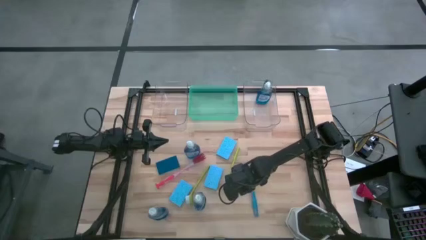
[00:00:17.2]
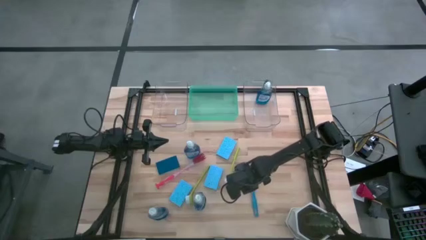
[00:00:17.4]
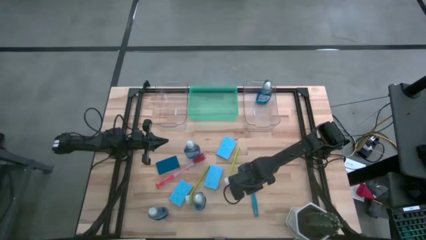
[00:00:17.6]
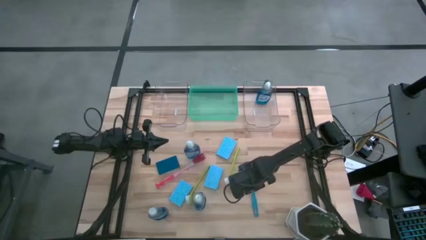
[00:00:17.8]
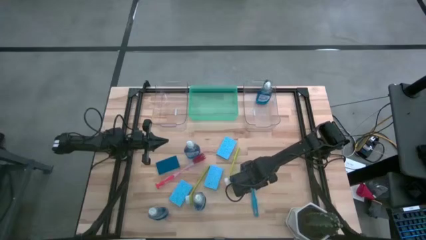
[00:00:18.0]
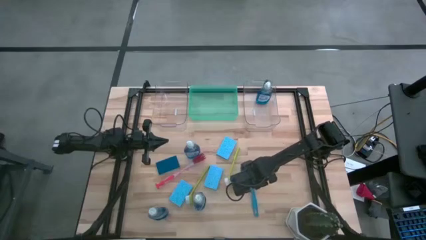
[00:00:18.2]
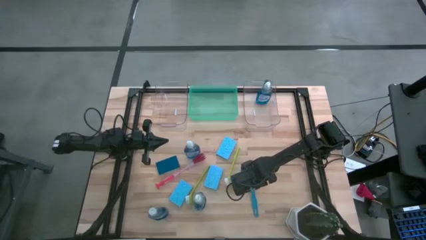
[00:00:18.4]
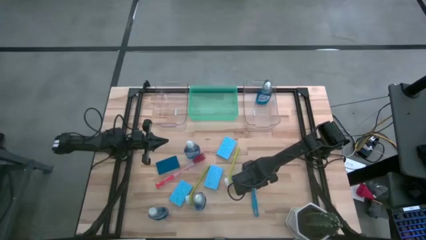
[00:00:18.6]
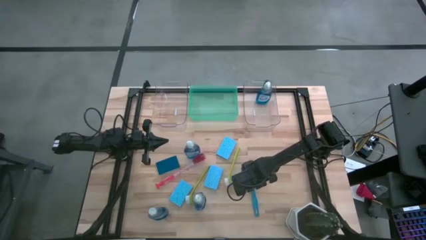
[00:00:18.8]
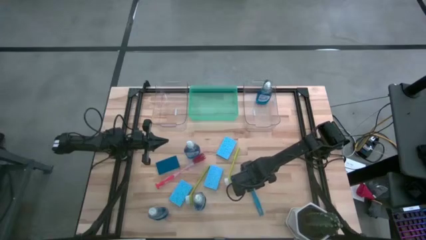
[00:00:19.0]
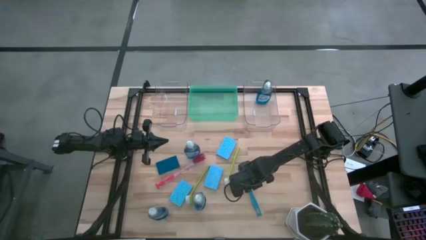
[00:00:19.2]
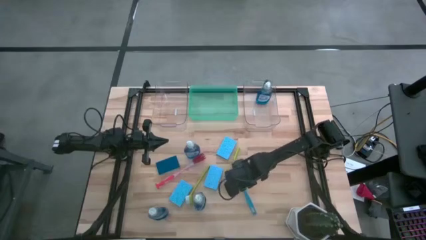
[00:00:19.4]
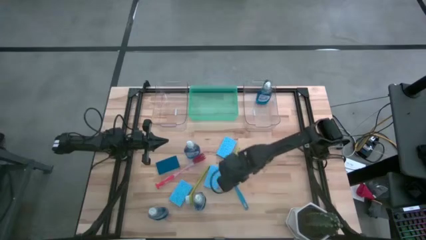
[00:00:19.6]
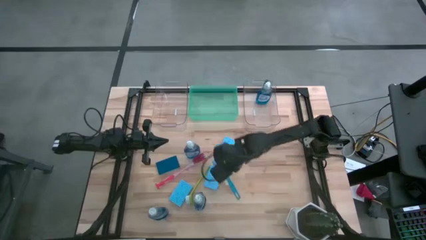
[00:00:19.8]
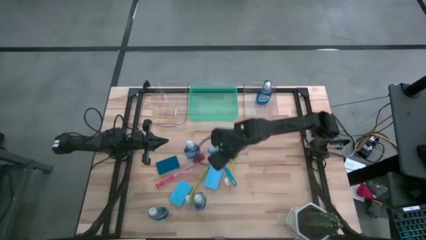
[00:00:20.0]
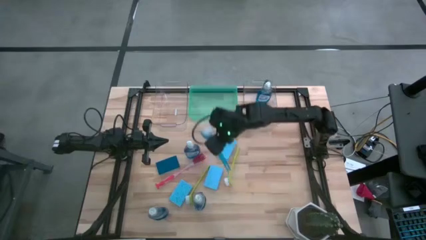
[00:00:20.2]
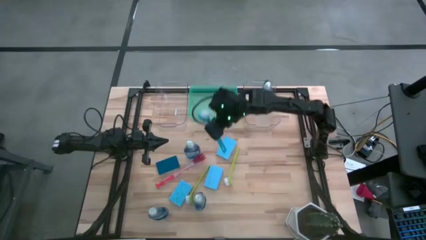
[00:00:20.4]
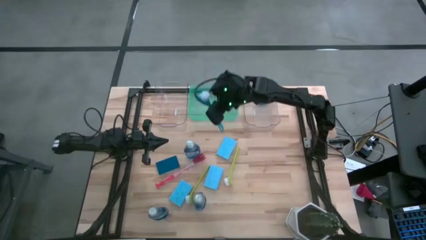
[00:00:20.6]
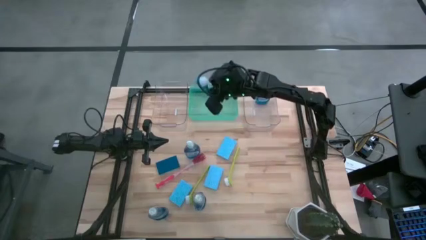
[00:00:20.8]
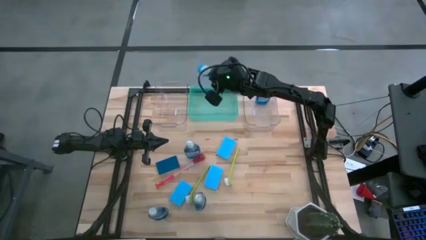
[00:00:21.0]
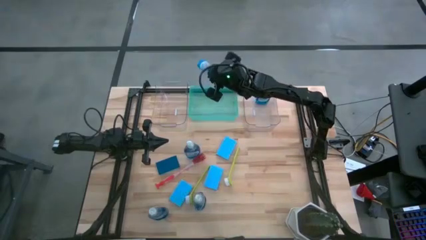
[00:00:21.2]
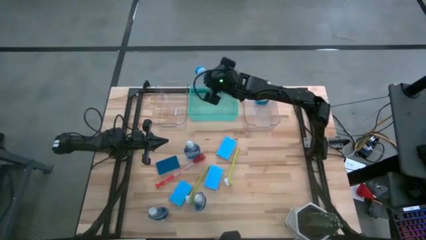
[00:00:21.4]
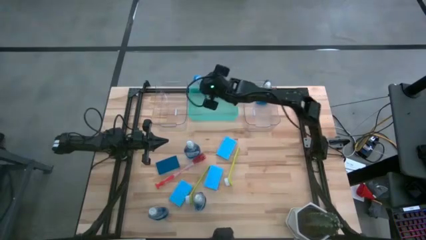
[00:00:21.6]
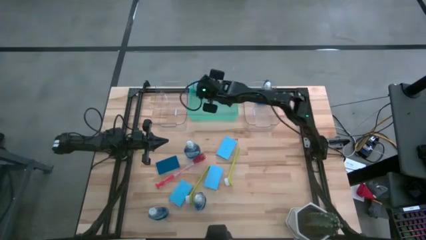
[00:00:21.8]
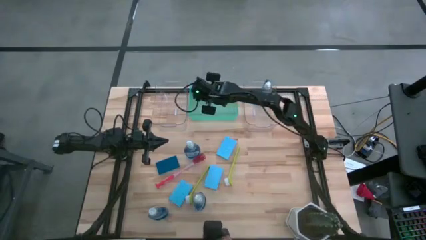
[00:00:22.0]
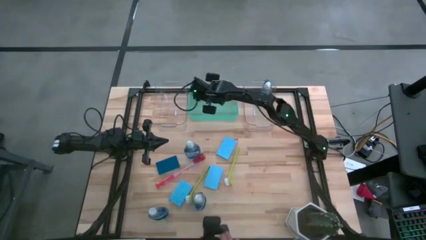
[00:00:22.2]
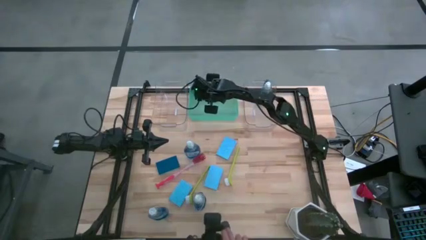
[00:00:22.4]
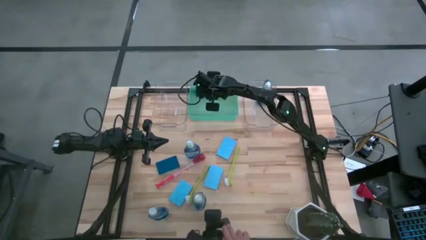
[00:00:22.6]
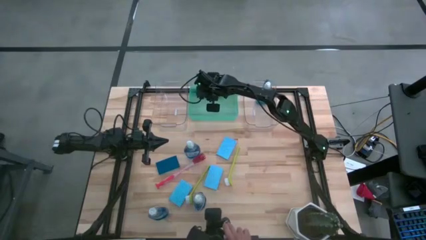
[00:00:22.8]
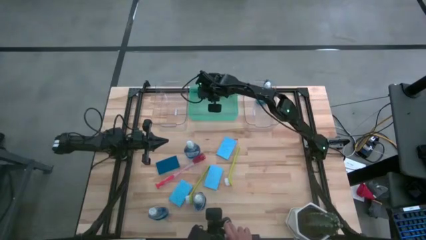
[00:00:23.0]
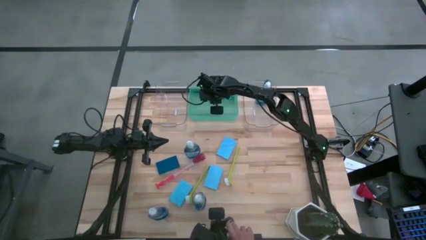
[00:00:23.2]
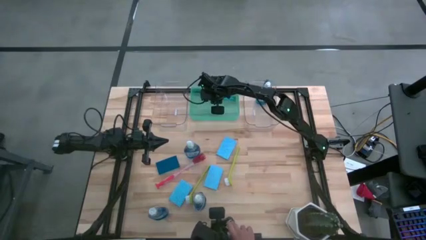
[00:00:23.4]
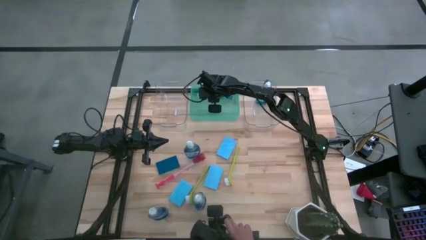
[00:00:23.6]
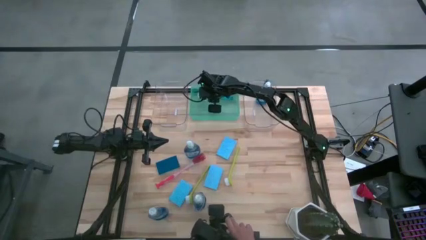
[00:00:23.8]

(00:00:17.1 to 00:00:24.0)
Task: Pick & Place Kitchen Sink Supplies
Put the blue dishwashing brush into the green bin

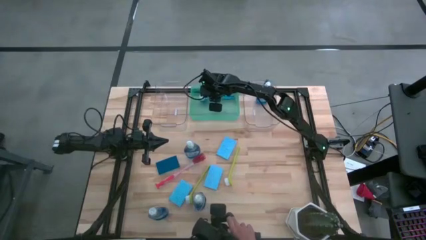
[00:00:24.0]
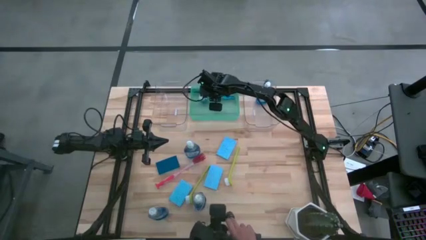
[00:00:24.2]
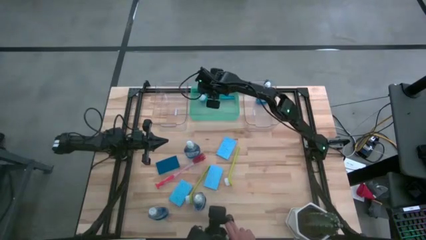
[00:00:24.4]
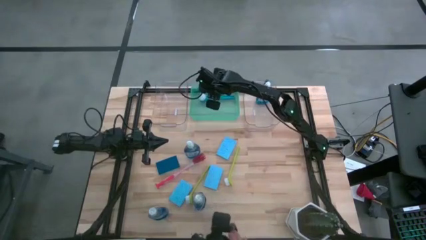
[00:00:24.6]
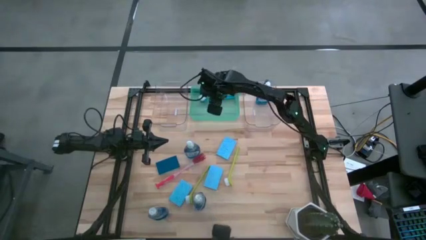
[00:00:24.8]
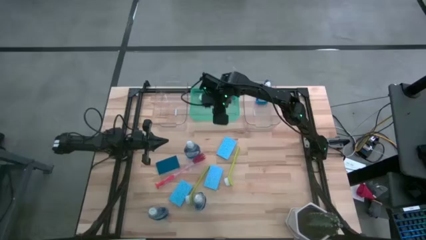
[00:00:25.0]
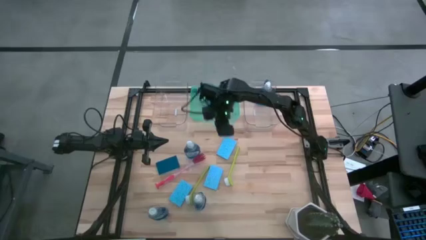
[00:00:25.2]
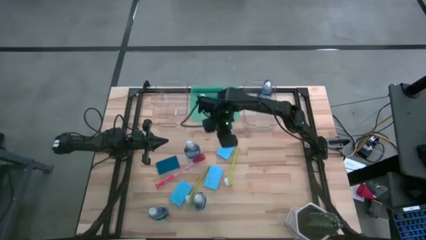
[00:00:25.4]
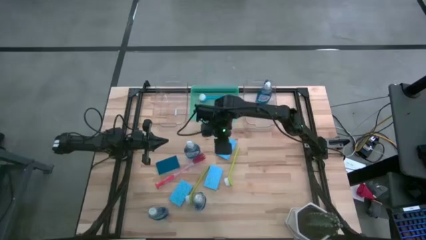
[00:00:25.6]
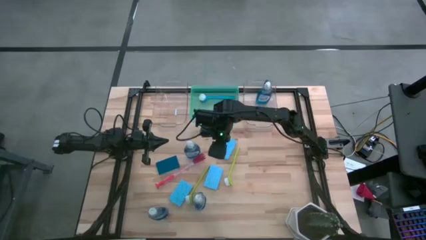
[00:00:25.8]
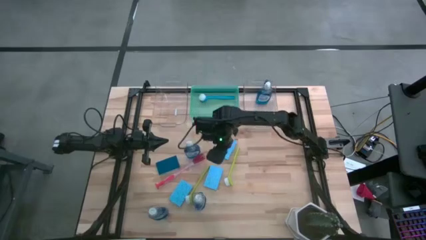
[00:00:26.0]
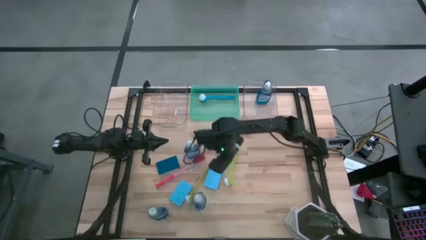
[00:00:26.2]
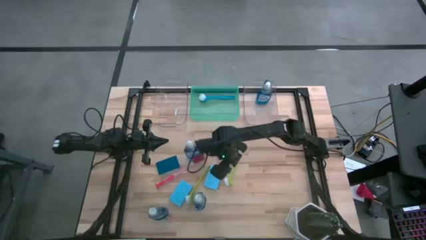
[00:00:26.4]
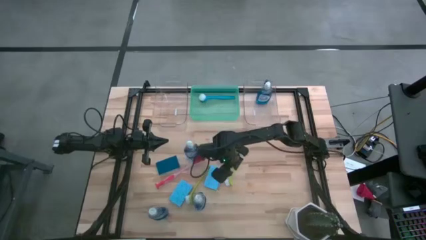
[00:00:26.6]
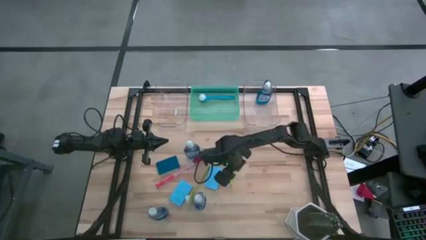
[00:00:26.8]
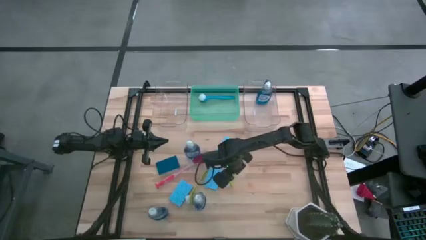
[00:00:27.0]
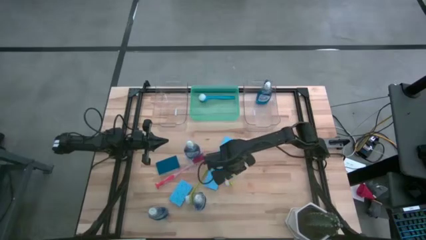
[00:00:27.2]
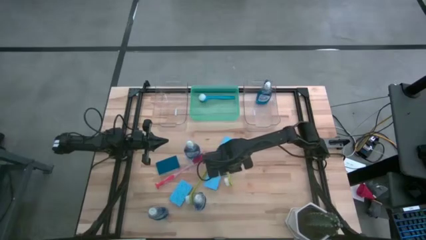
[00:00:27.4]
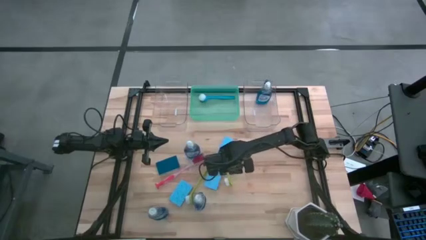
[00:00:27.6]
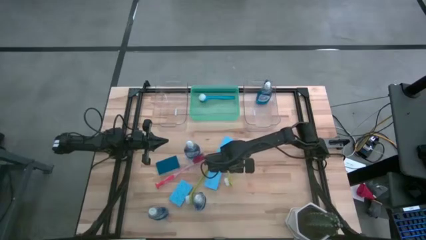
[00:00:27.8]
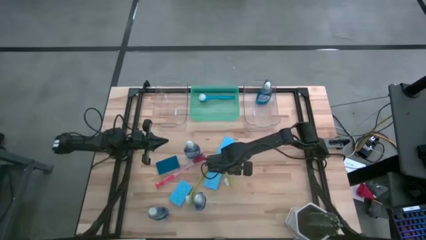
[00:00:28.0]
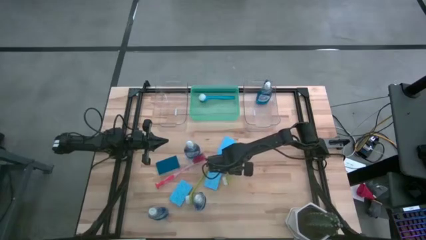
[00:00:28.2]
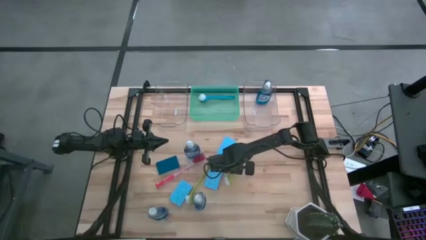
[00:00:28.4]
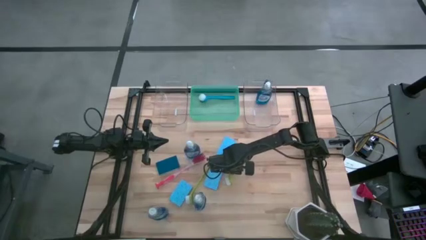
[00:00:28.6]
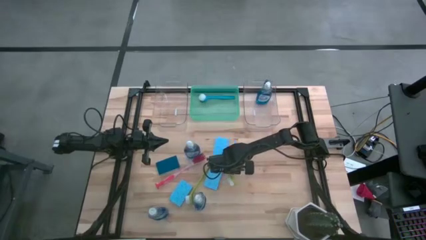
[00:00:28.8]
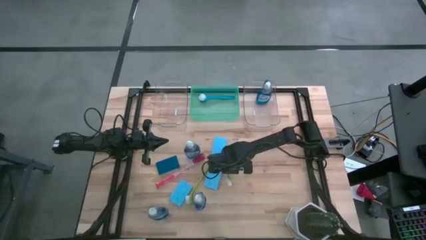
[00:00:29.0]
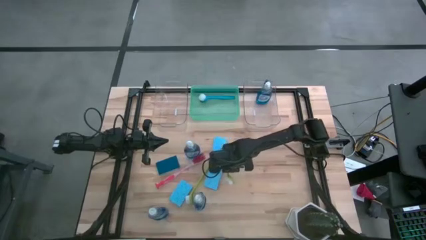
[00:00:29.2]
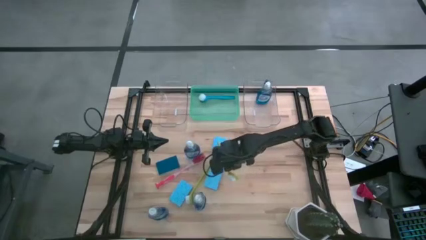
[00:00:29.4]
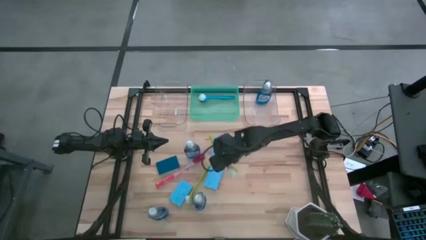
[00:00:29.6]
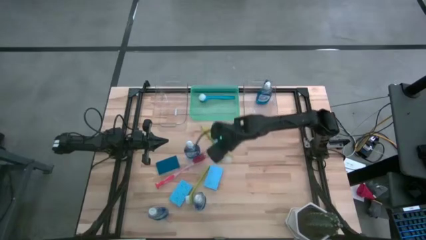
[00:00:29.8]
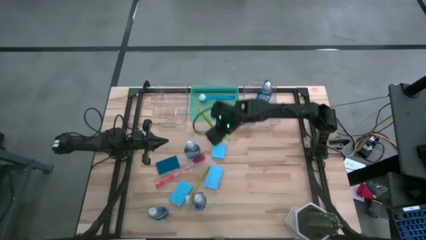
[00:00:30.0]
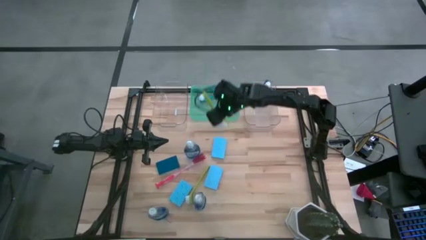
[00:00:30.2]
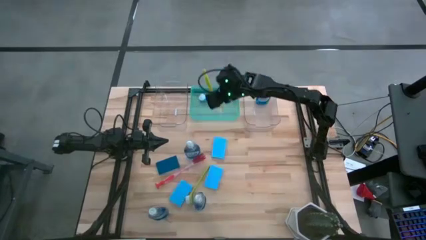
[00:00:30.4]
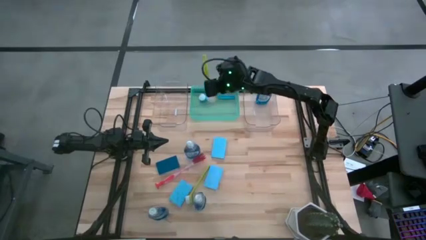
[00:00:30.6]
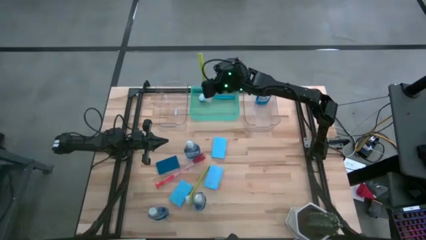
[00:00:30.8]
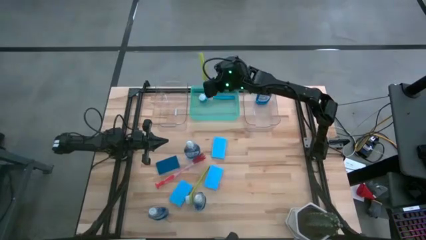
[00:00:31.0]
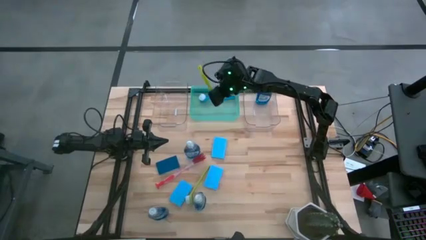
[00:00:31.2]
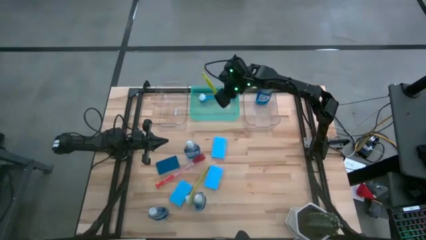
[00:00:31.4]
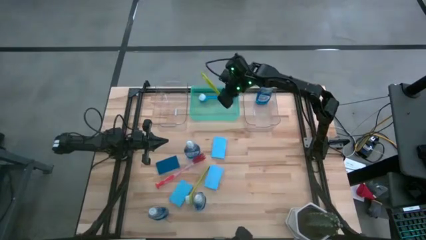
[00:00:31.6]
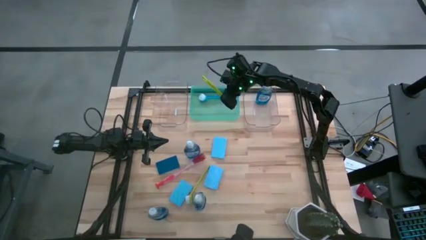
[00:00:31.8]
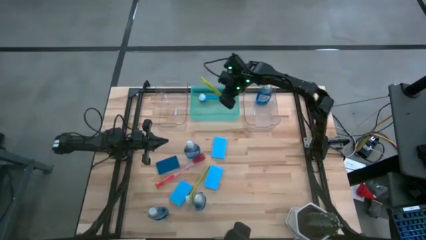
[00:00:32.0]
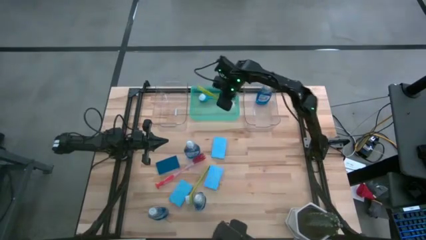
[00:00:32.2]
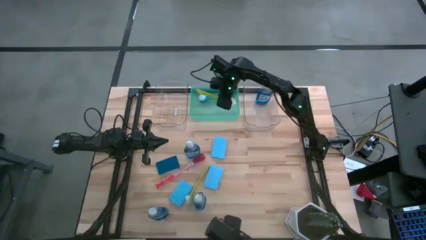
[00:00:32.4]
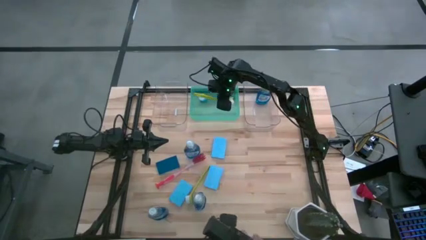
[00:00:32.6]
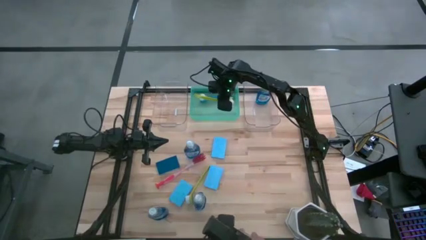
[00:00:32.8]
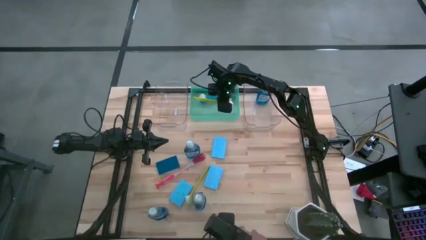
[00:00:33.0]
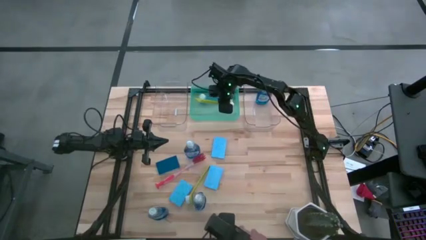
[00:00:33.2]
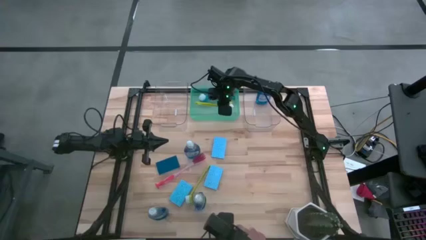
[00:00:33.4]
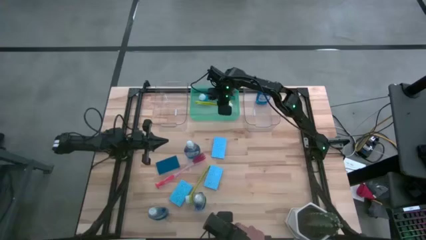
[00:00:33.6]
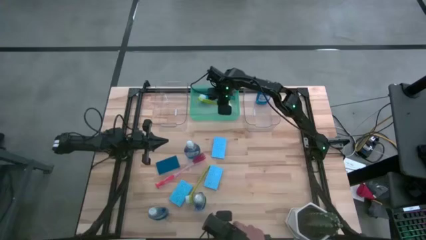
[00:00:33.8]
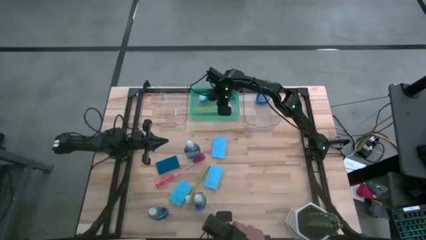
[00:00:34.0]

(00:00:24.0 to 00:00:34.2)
Put the green dishwashing brush into the green bin
